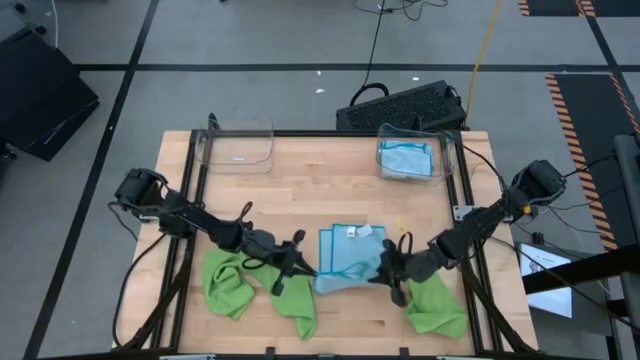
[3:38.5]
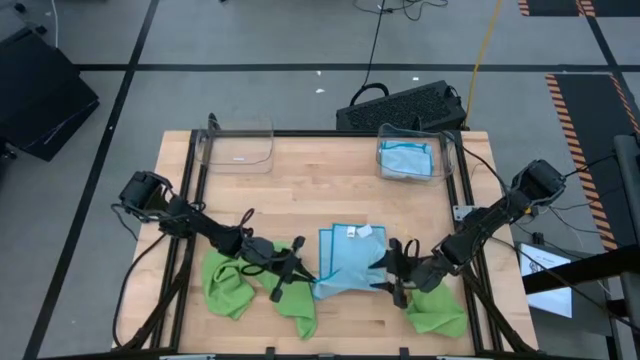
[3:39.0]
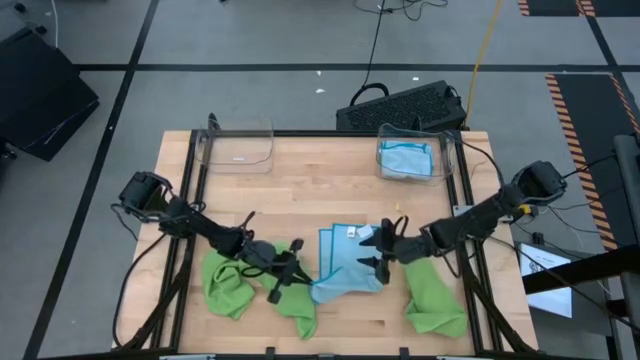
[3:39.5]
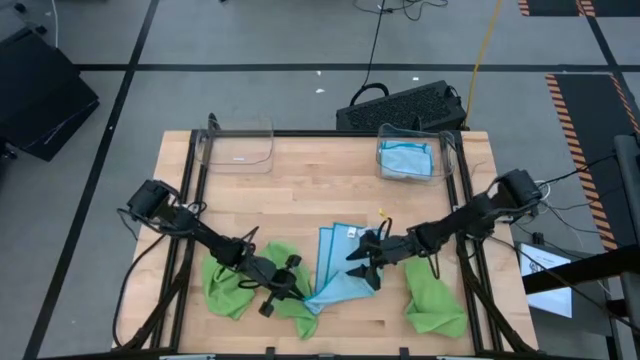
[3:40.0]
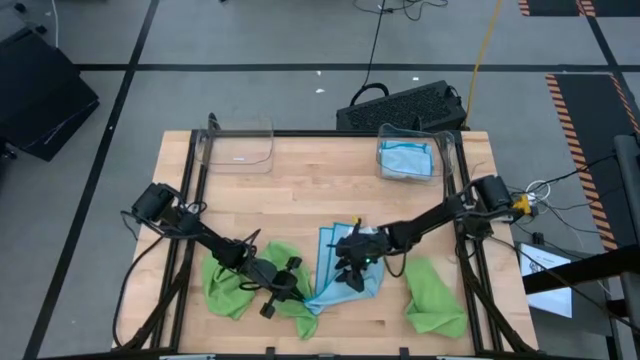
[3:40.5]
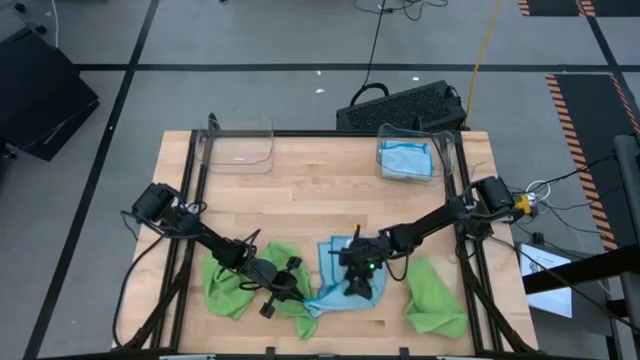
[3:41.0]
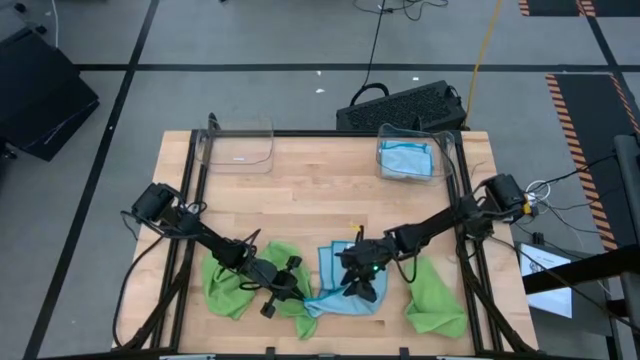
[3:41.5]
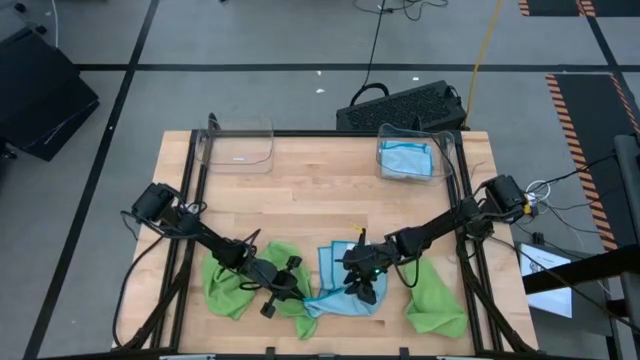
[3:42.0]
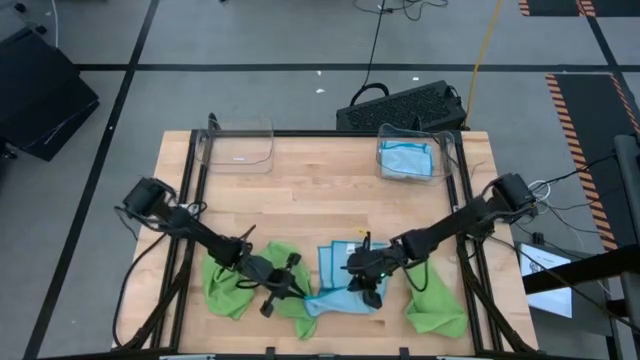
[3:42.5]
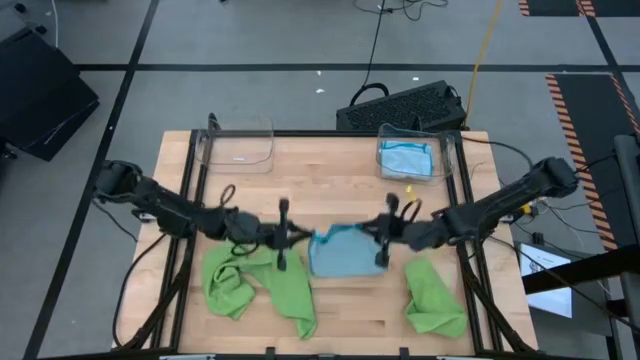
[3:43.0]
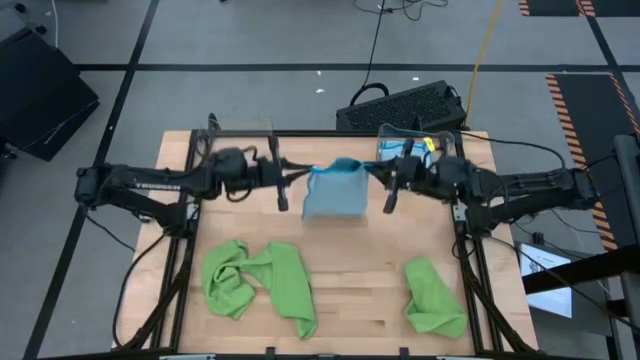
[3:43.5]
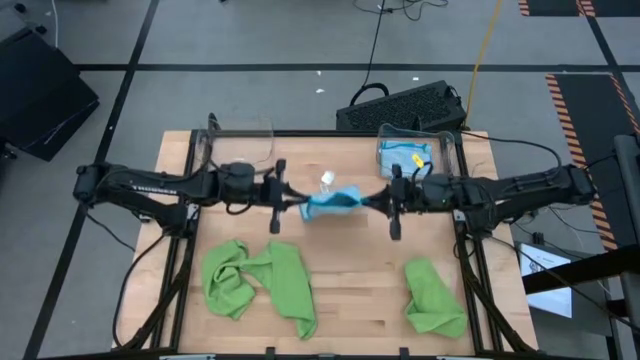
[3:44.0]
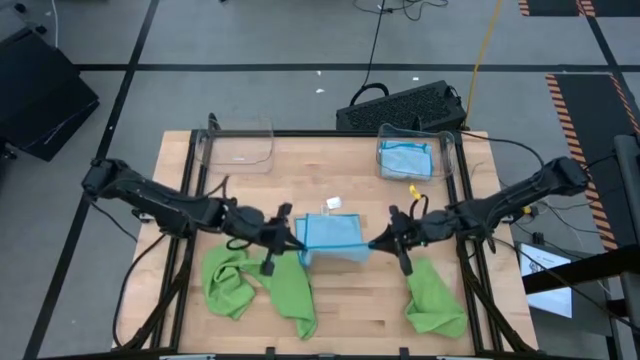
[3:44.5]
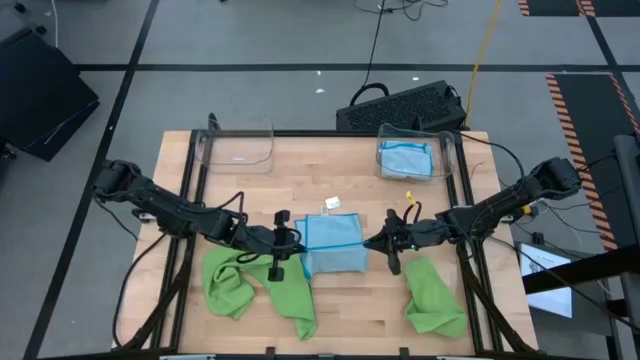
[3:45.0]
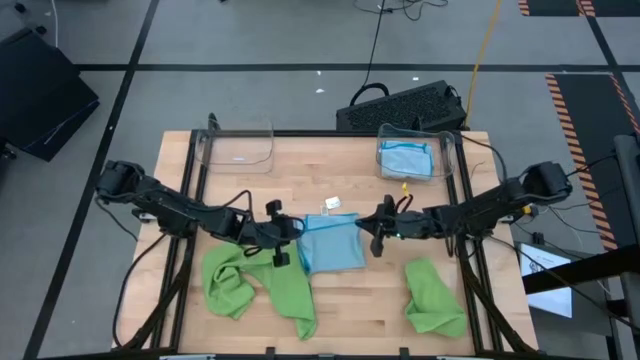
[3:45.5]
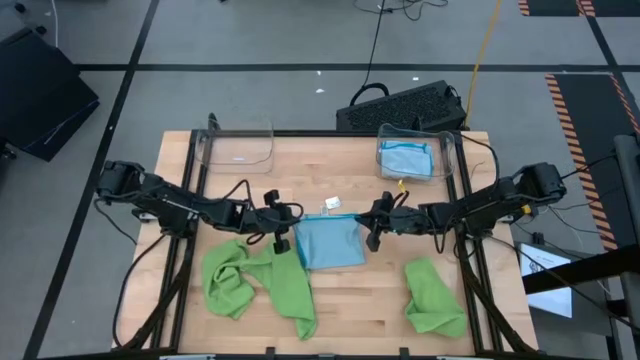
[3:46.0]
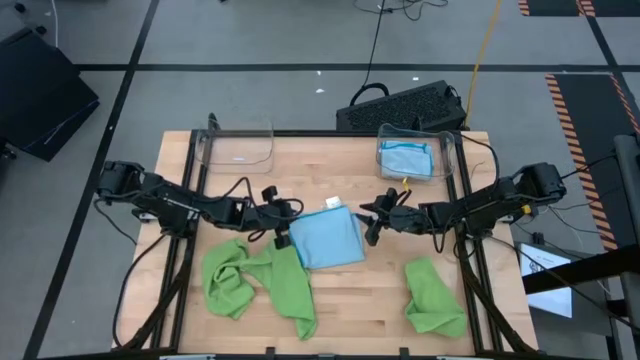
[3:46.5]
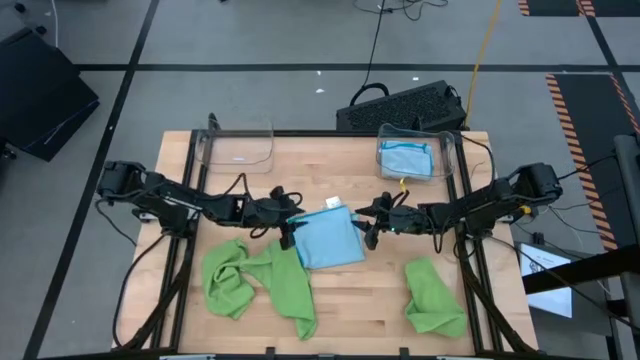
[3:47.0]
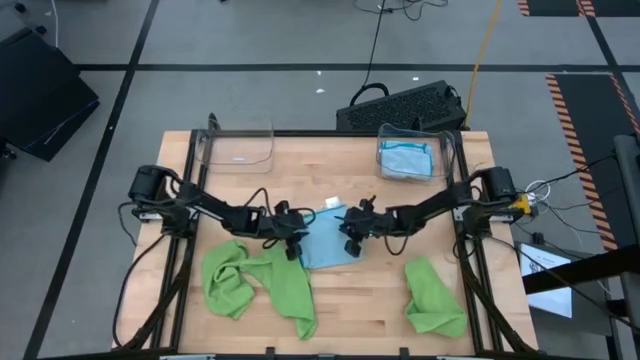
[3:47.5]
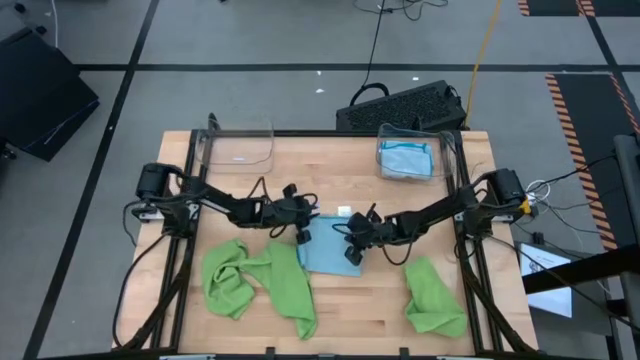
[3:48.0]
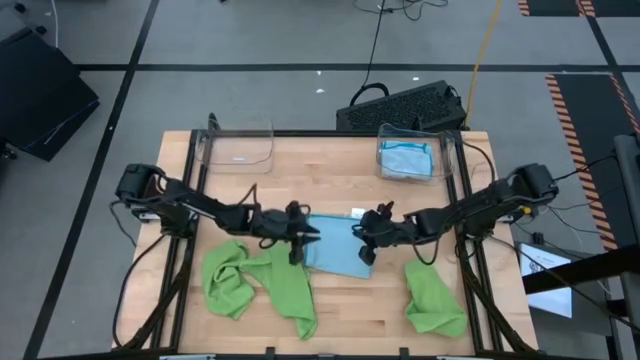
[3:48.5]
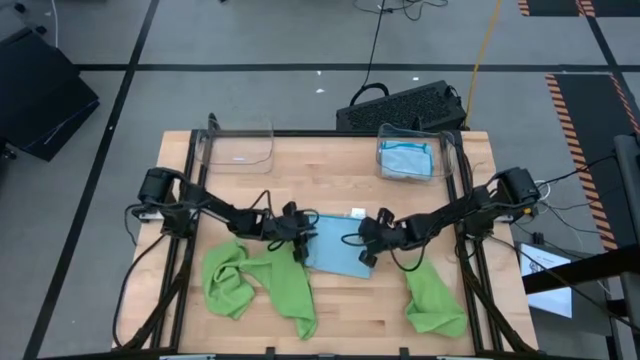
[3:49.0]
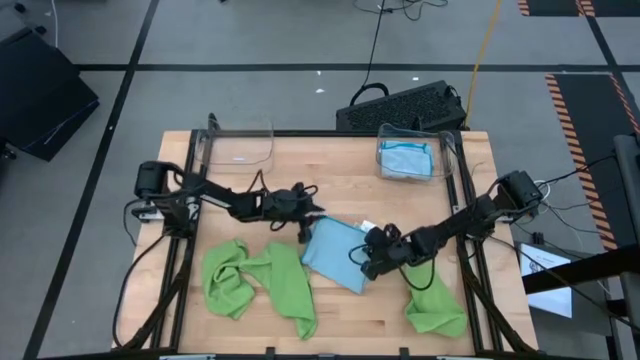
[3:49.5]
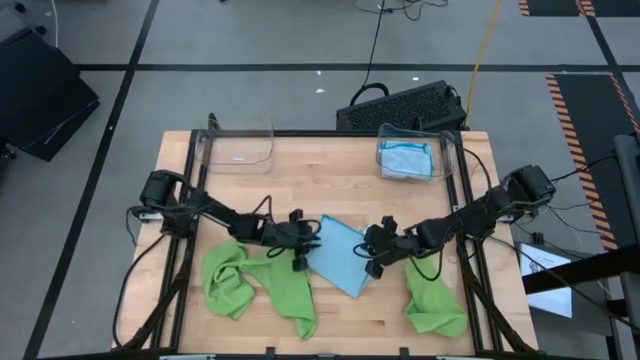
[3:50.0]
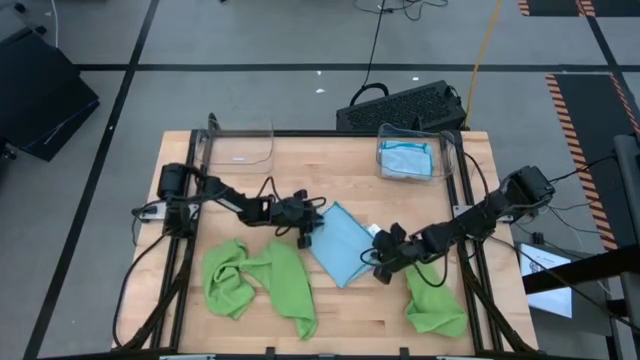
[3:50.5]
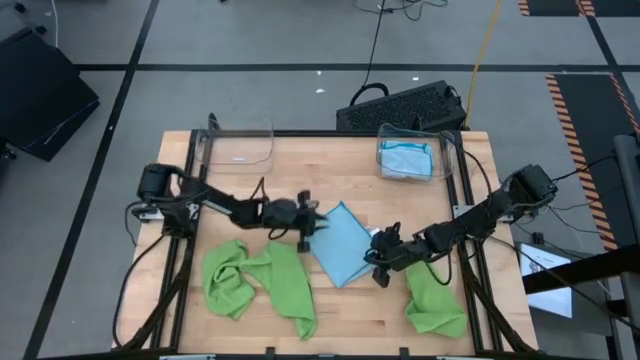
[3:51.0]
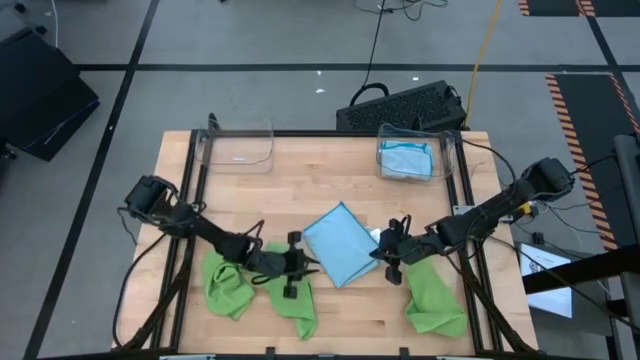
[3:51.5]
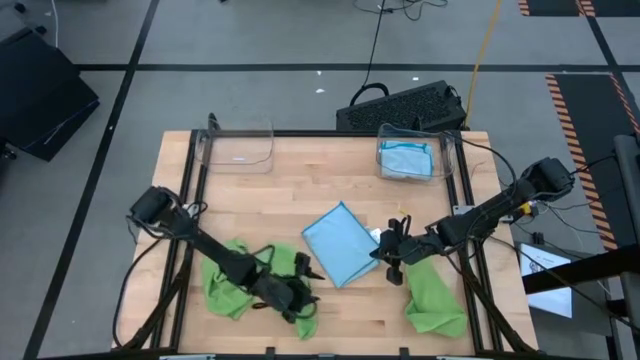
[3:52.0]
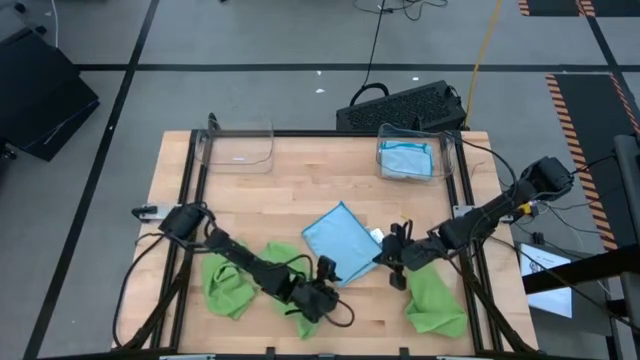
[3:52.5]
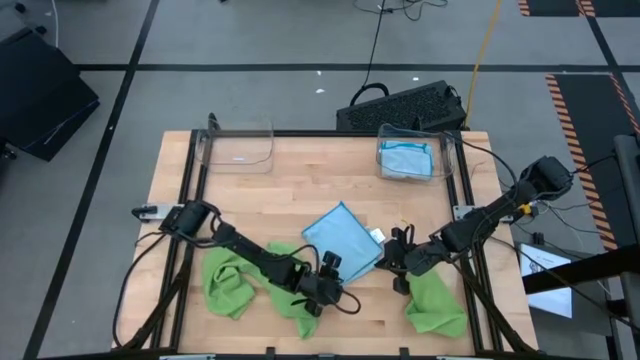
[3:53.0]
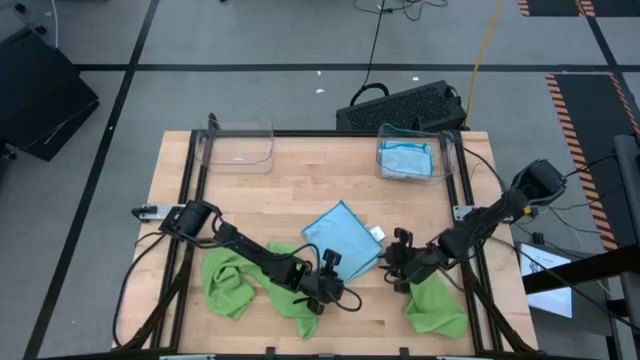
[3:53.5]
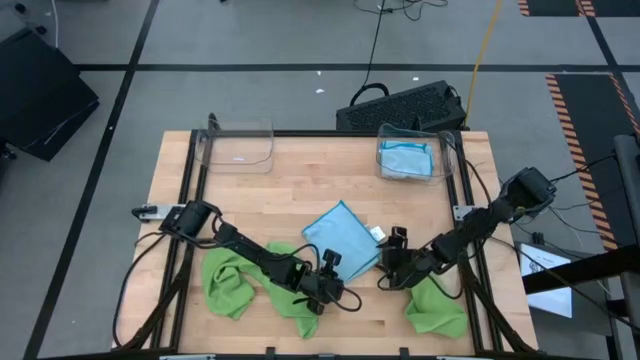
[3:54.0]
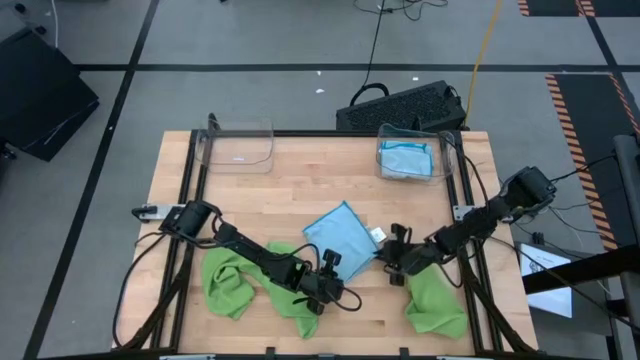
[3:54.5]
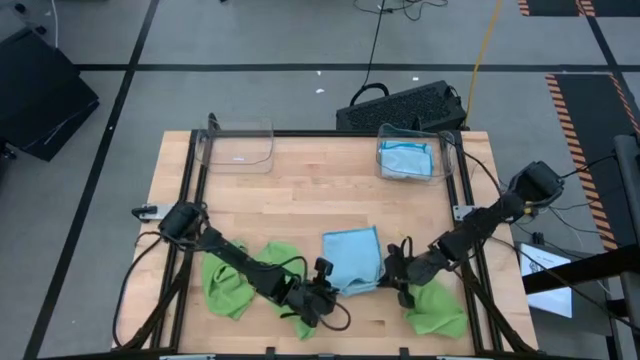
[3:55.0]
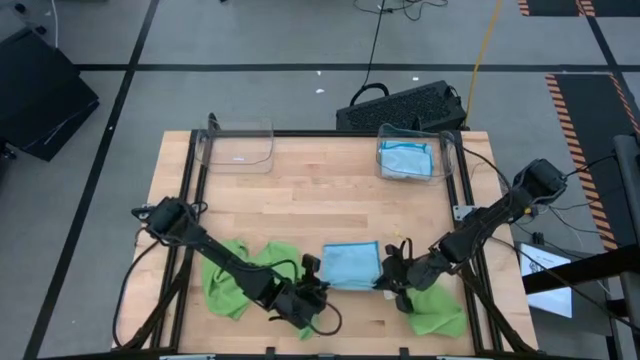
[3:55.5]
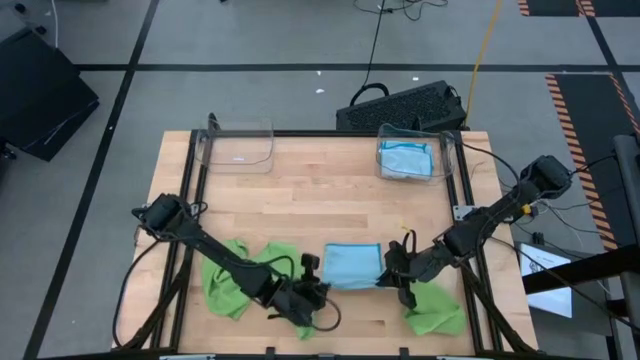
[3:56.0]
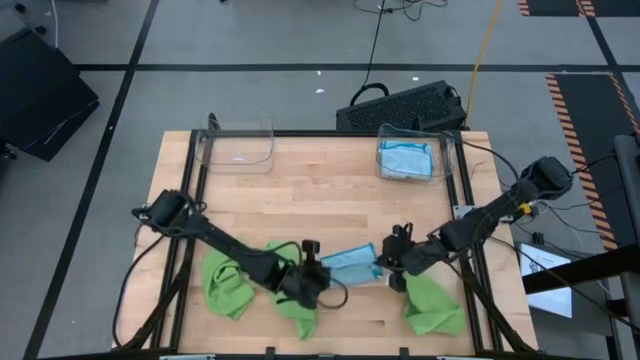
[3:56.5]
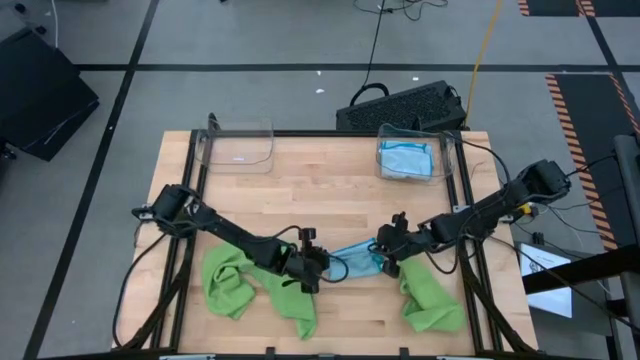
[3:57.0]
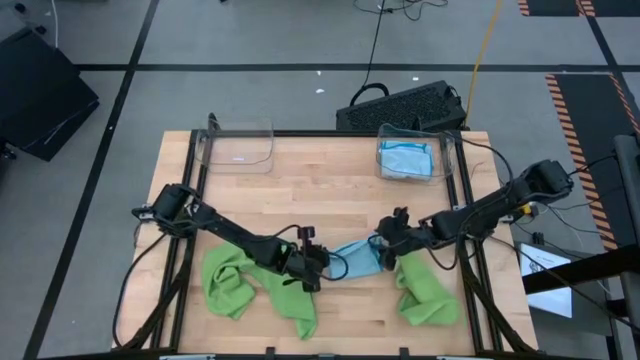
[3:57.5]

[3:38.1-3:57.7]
Task: Fold microfiber towels
Fold the blue microfiber cloth

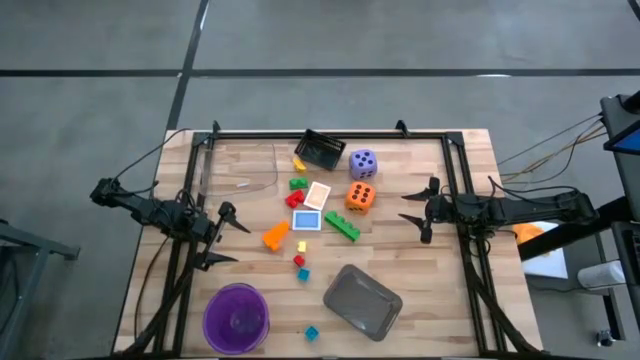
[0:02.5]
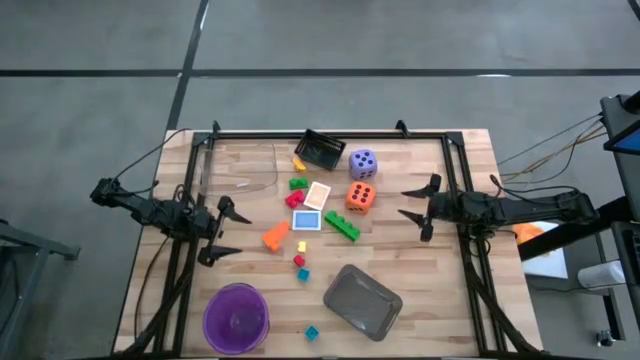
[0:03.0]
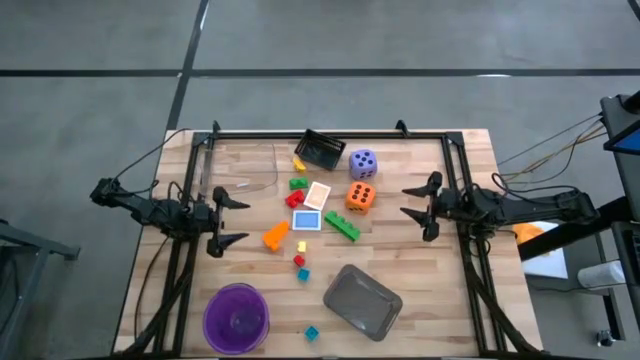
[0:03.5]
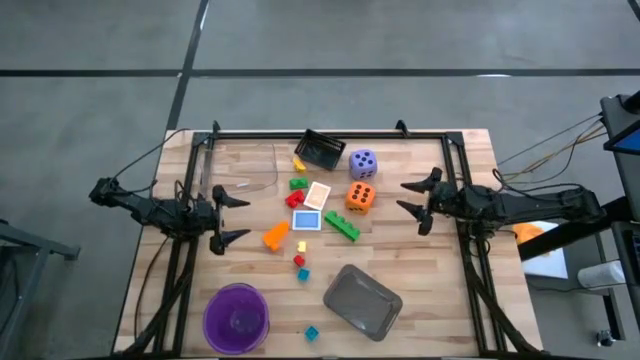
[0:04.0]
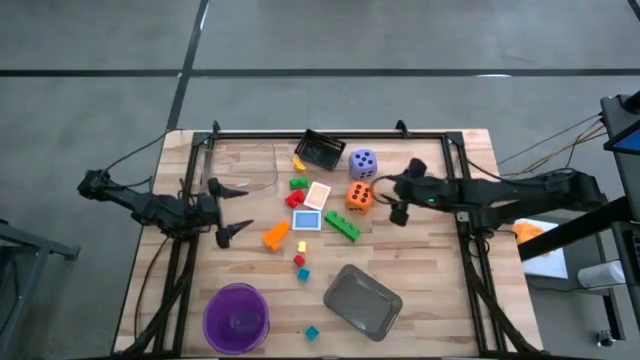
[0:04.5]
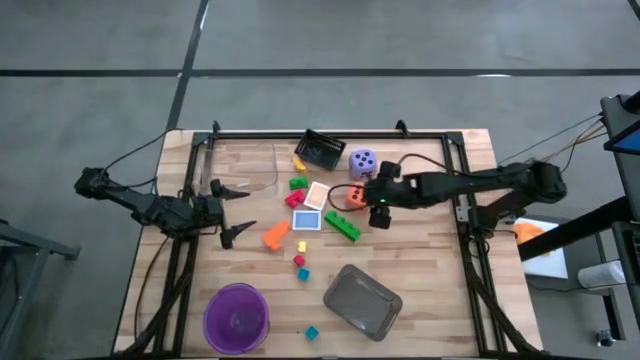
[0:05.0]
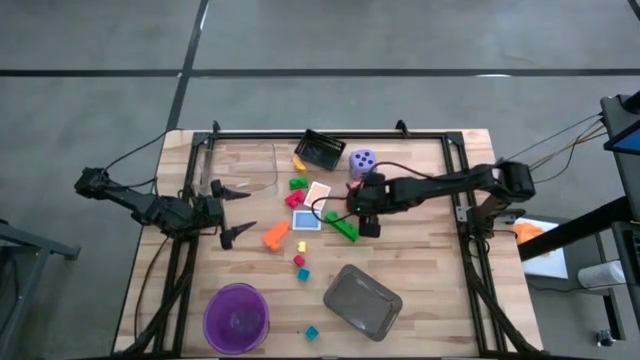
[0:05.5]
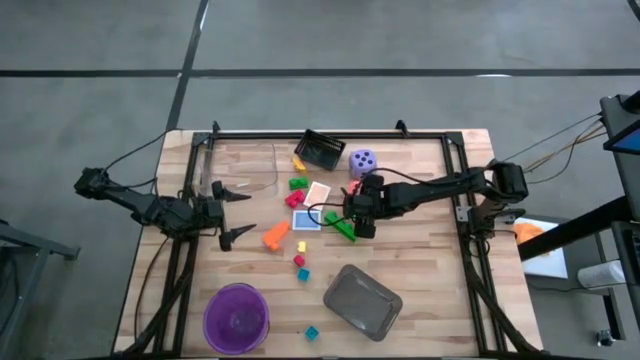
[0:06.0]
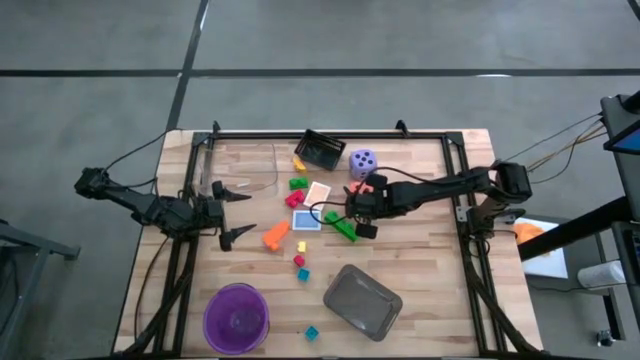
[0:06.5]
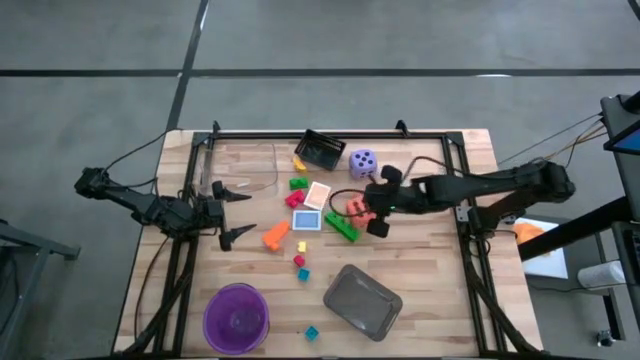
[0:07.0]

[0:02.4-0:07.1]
Task: Pick & Place Toys
Put the orange die into the gray bin
